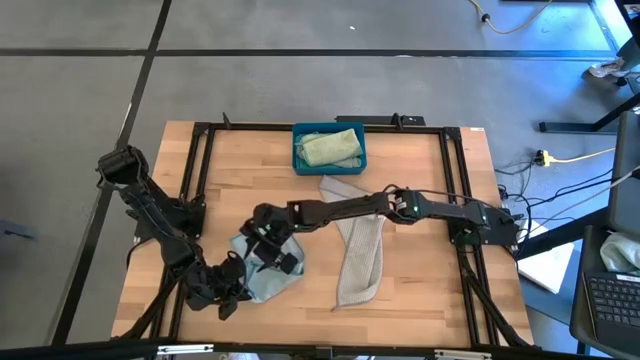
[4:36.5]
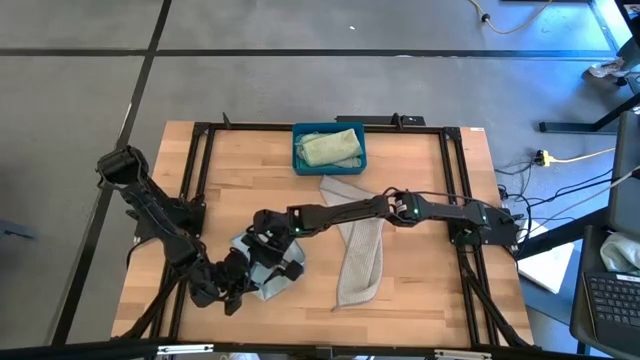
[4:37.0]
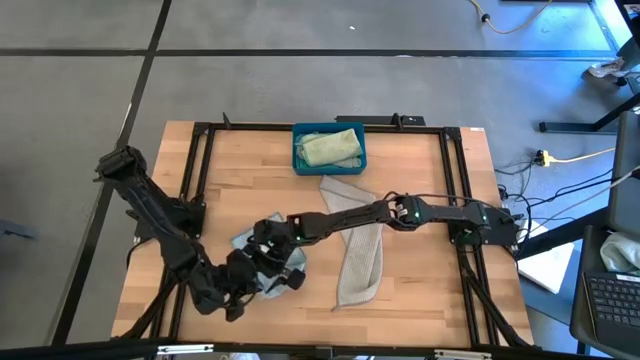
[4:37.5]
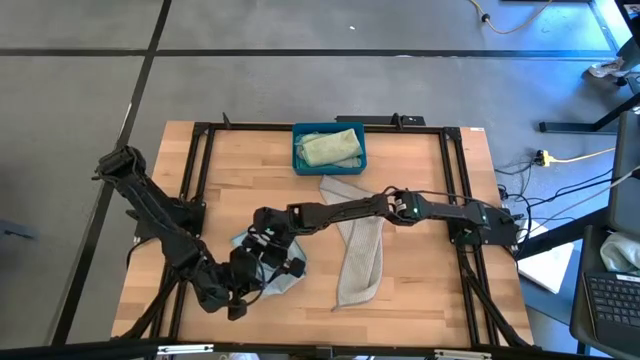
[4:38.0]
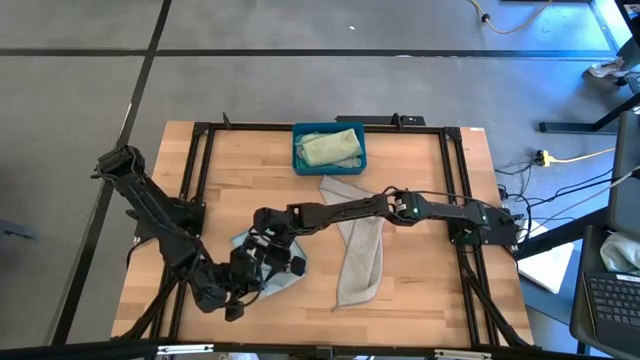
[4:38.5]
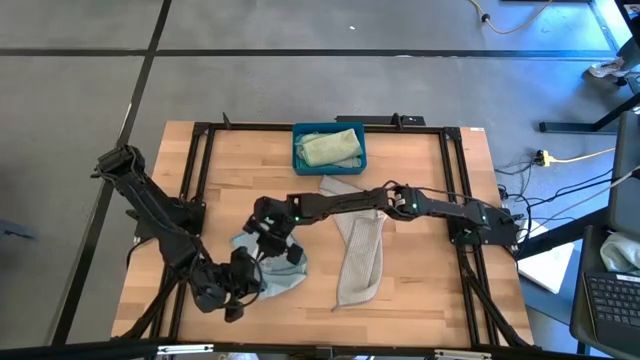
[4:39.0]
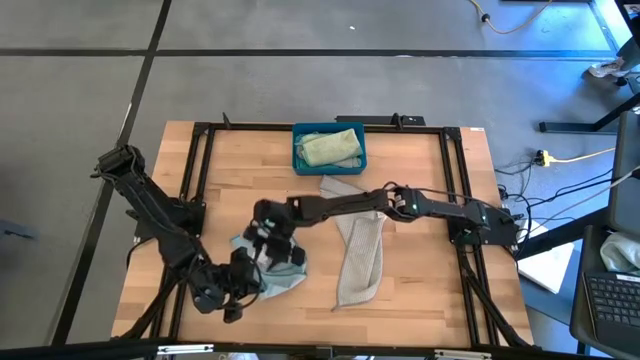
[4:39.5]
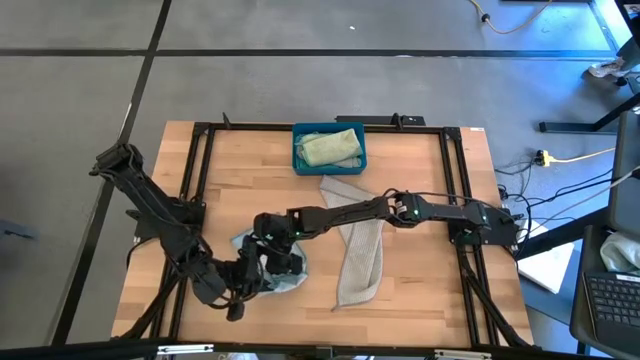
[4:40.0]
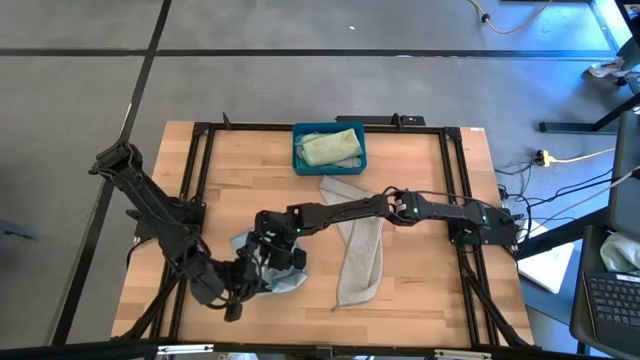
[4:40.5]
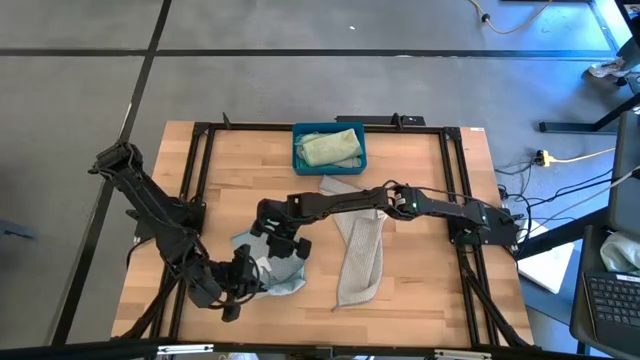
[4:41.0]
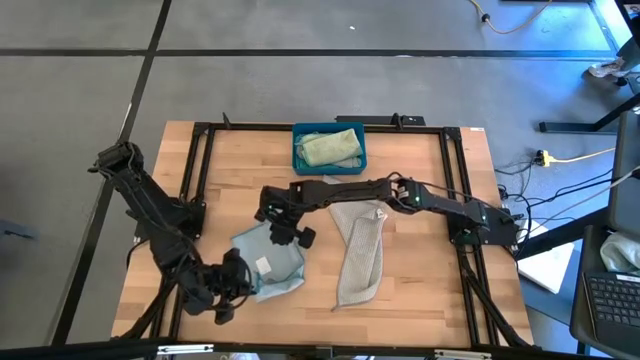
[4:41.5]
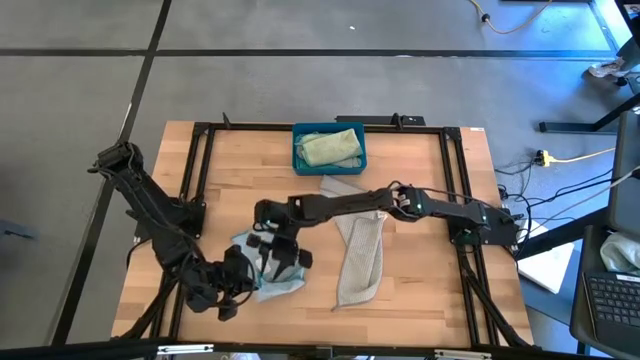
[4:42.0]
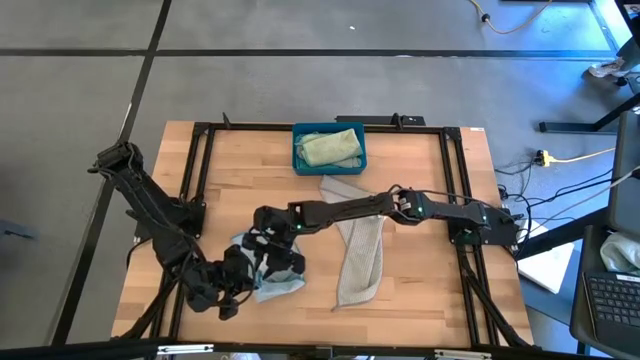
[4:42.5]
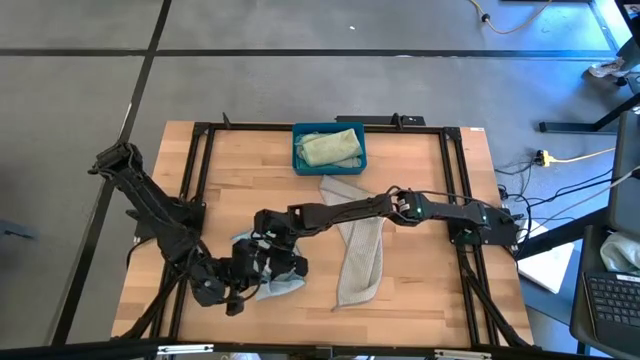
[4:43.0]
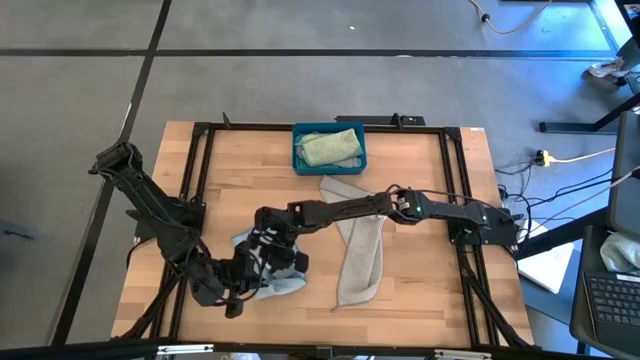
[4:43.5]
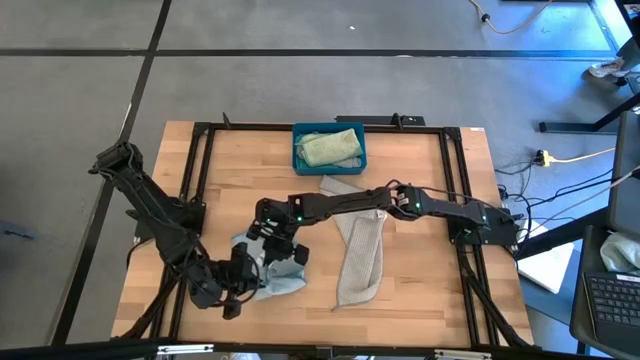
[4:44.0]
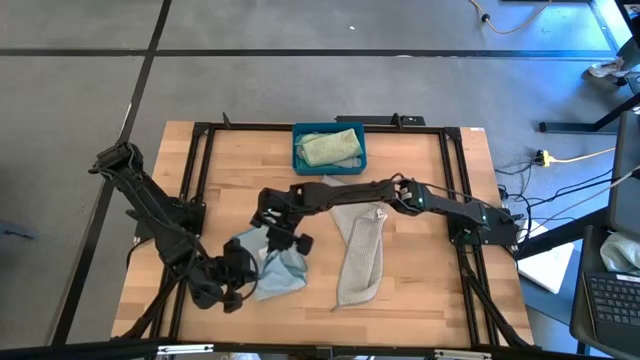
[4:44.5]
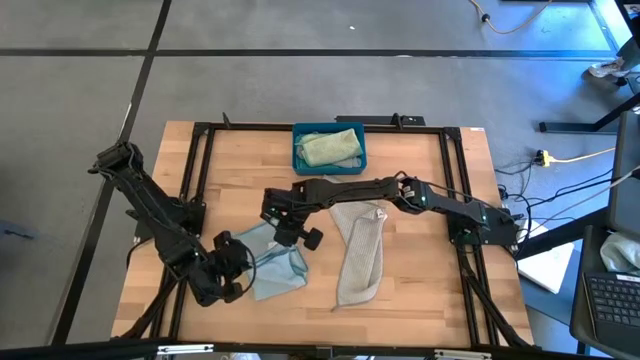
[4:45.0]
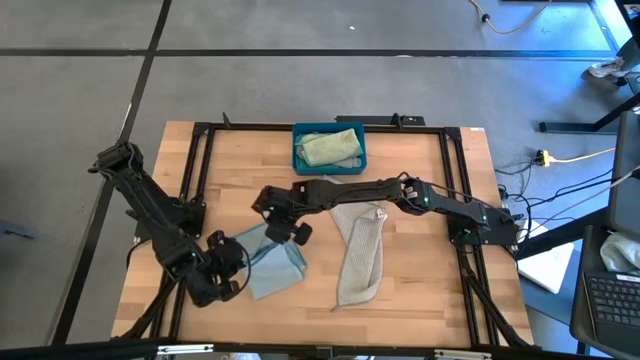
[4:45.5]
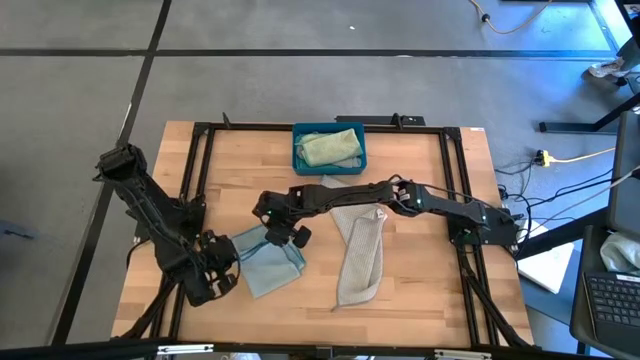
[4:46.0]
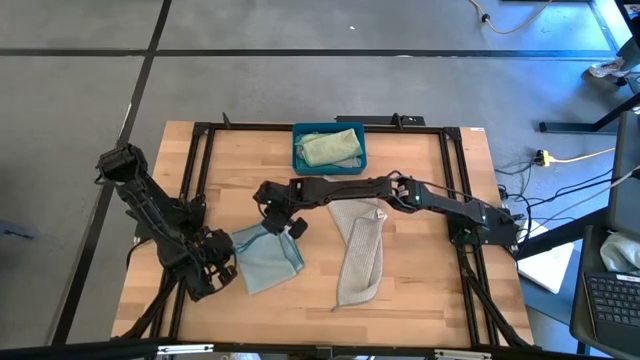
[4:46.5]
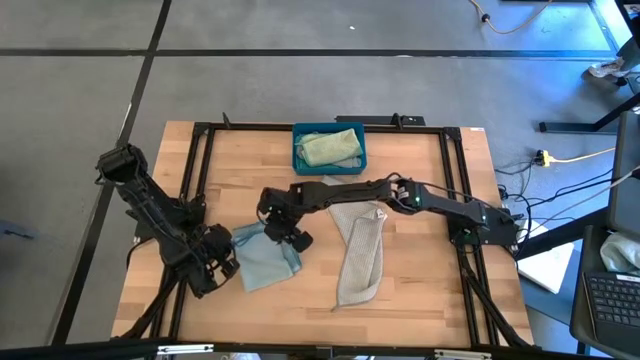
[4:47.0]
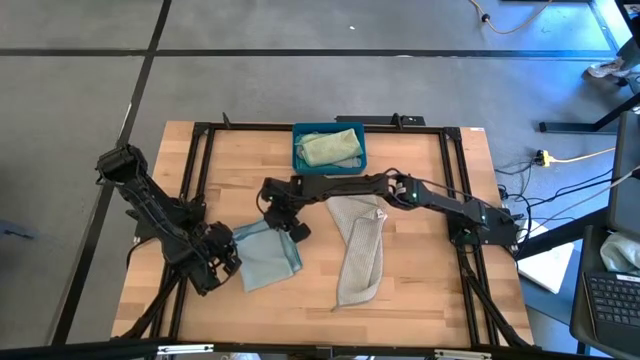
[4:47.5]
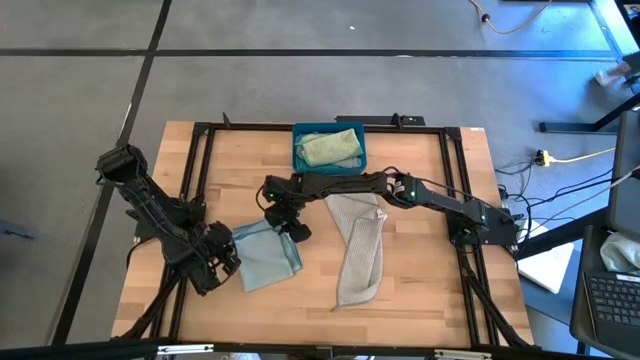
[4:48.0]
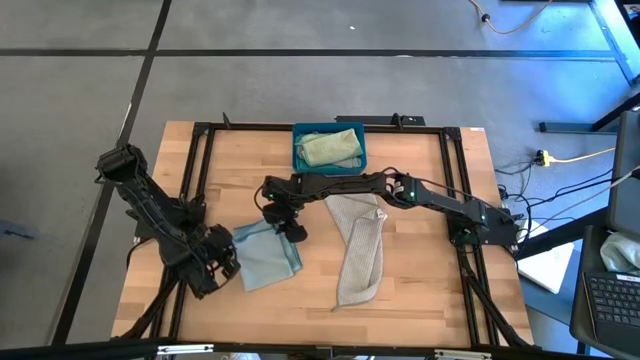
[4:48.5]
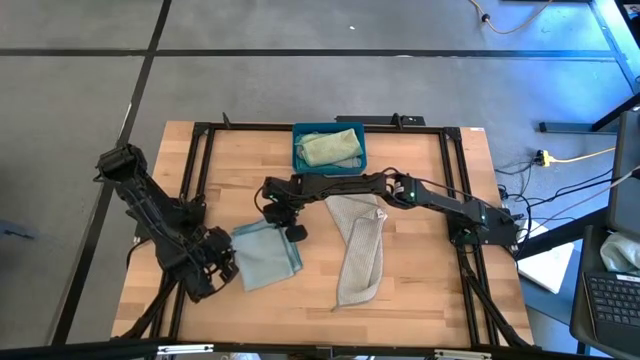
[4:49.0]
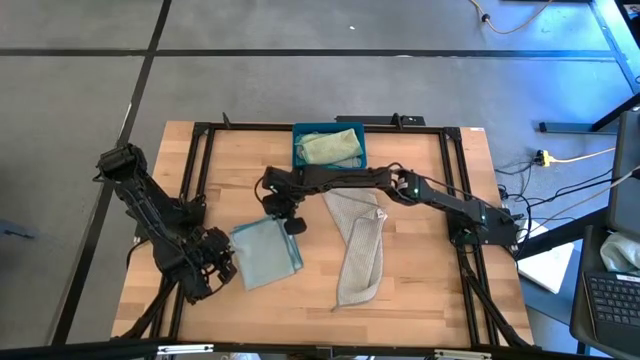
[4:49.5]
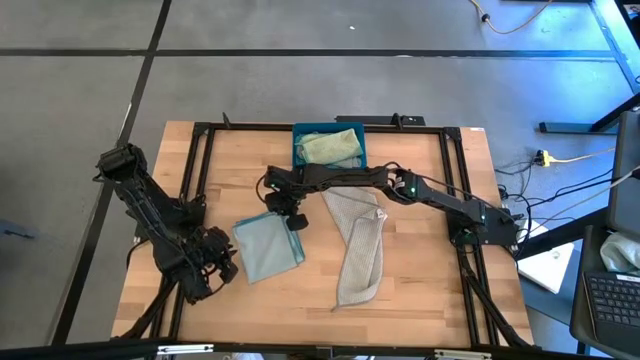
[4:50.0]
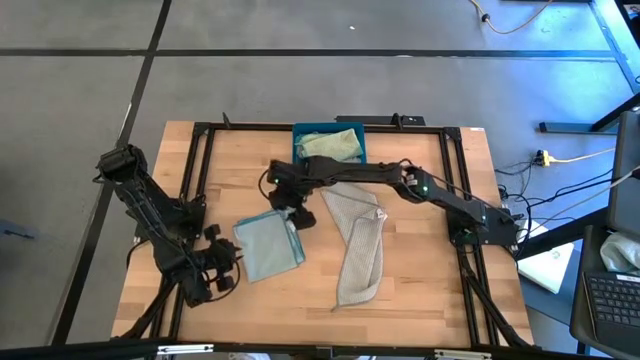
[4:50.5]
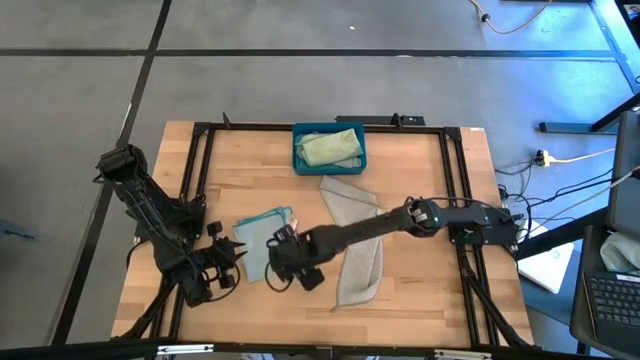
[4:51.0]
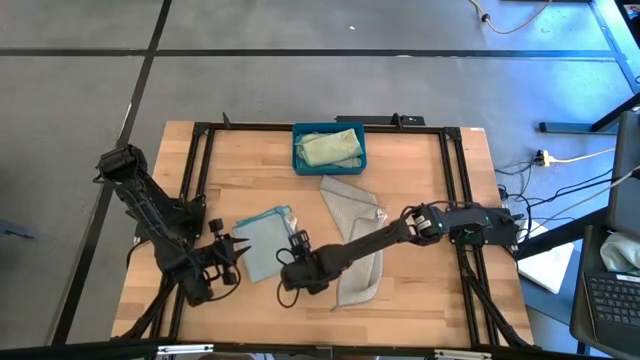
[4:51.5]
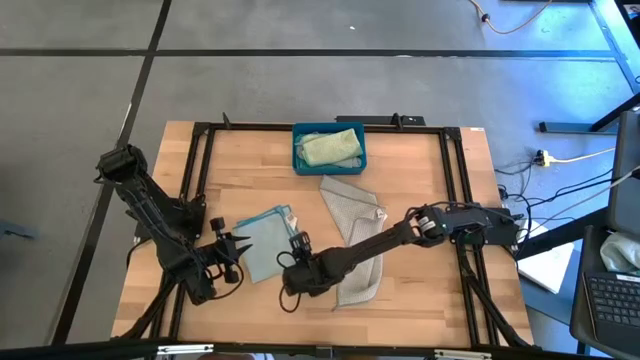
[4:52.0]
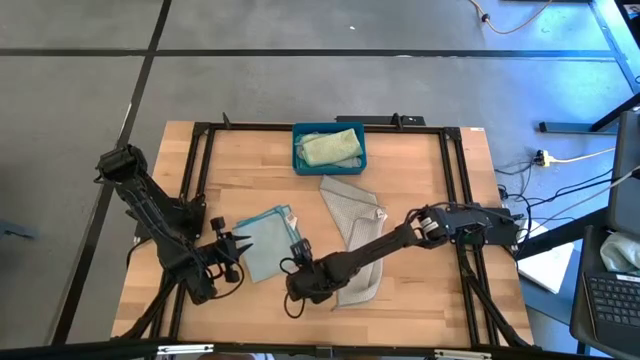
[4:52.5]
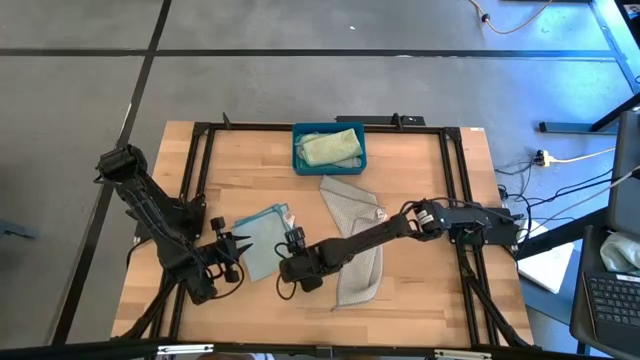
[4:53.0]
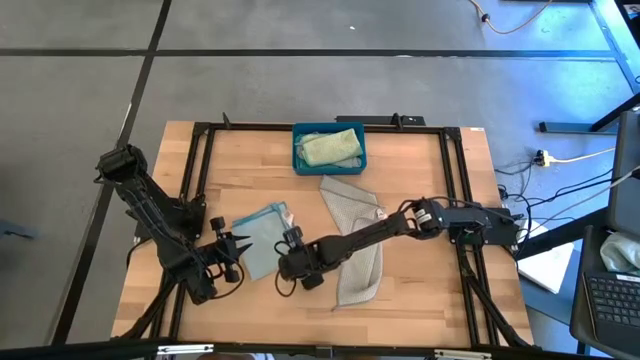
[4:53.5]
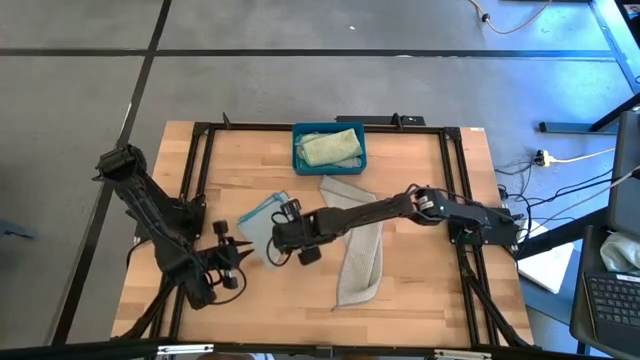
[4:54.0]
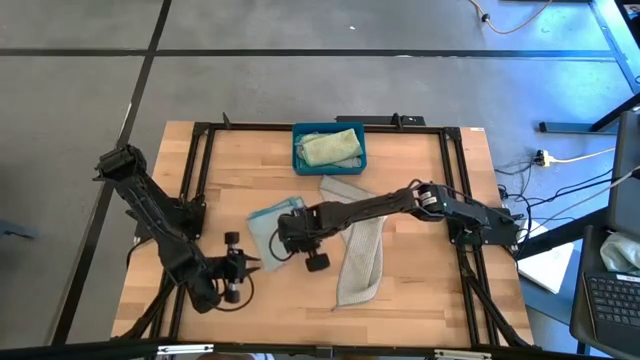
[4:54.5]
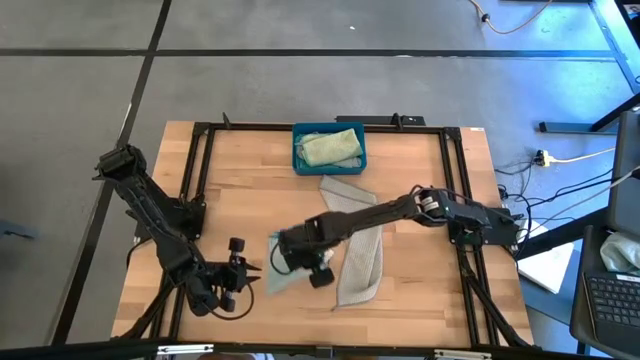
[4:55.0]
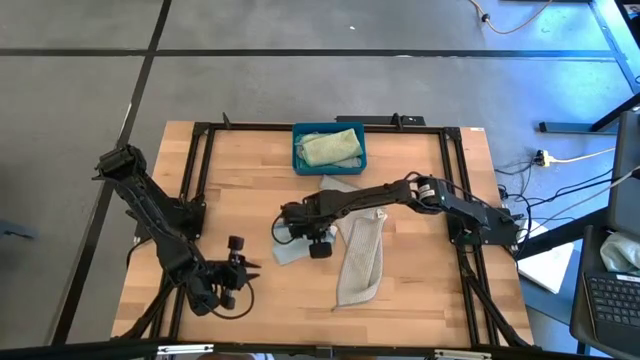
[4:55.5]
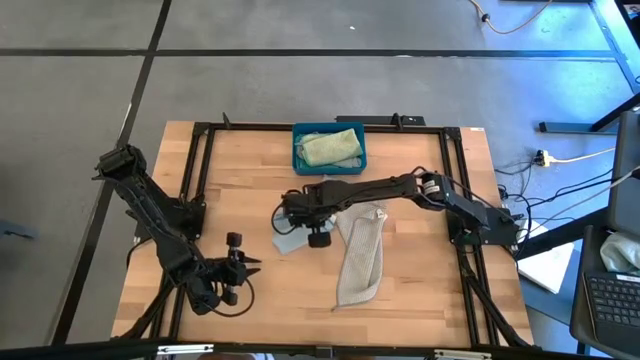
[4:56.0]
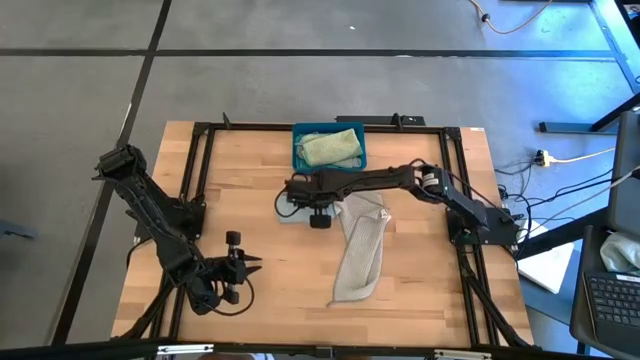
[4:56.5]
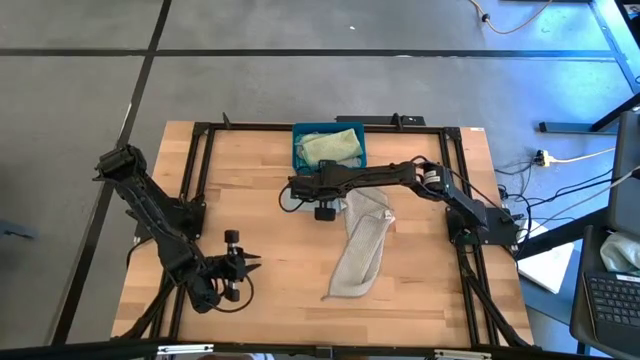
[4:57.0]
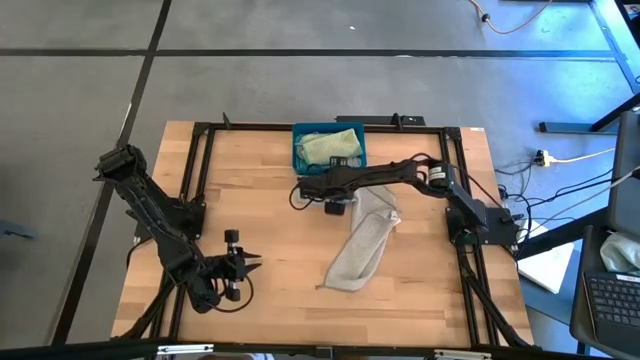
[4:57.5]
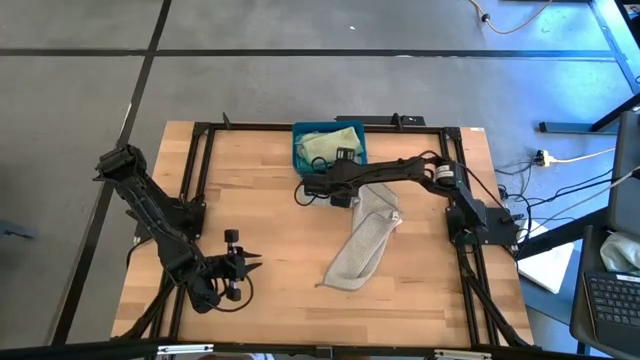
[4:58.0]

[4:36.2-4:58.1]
Task: Fold microfiber towels
Fold the light blue towel
